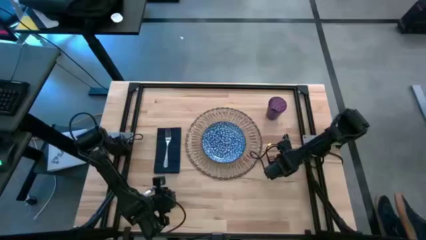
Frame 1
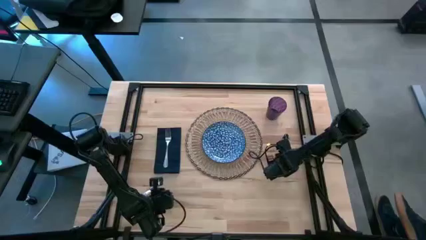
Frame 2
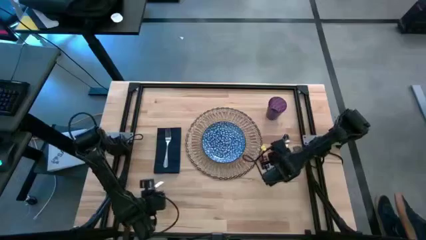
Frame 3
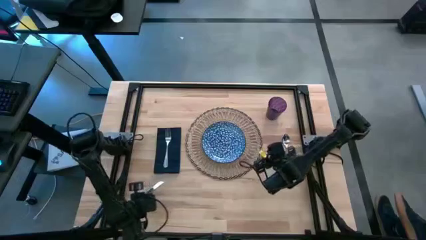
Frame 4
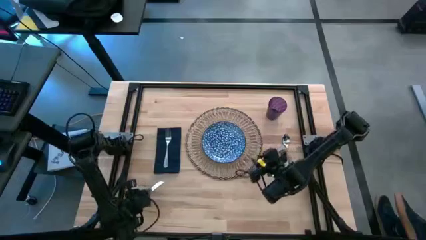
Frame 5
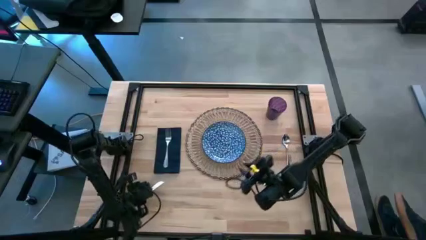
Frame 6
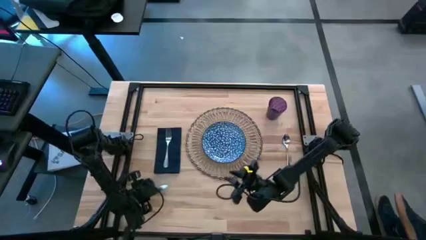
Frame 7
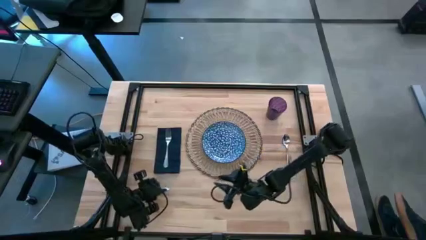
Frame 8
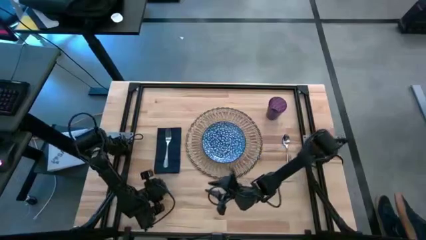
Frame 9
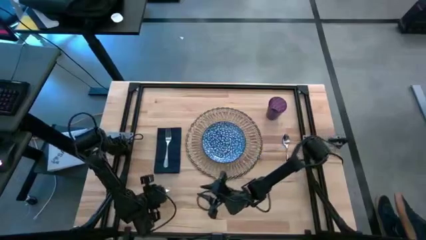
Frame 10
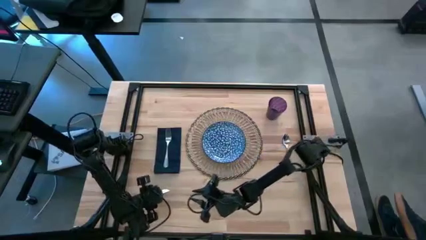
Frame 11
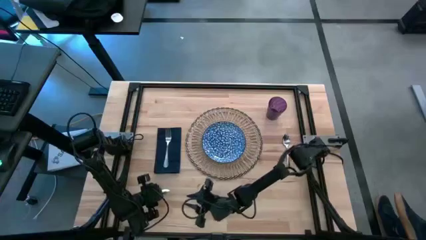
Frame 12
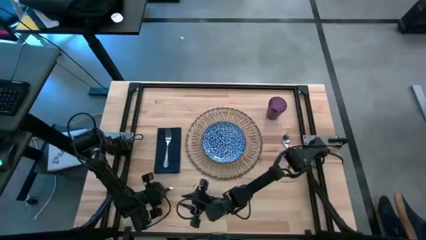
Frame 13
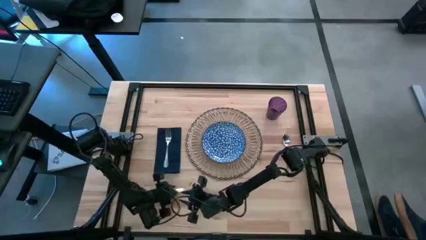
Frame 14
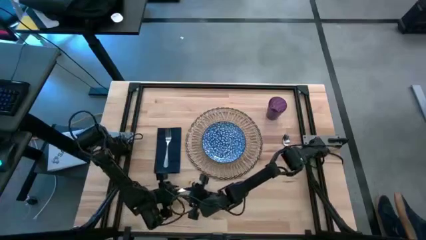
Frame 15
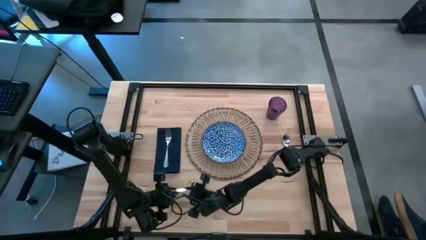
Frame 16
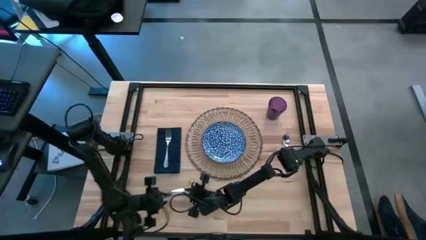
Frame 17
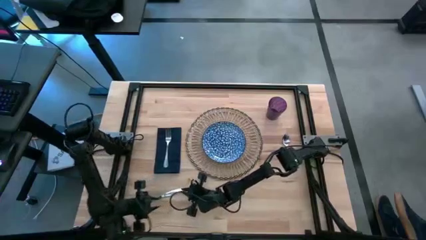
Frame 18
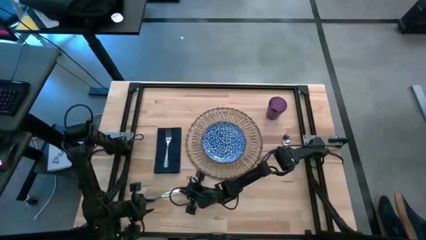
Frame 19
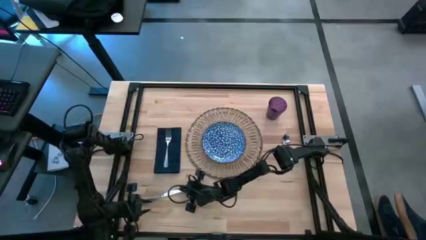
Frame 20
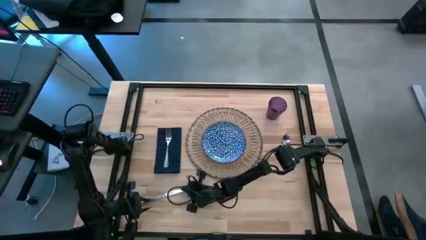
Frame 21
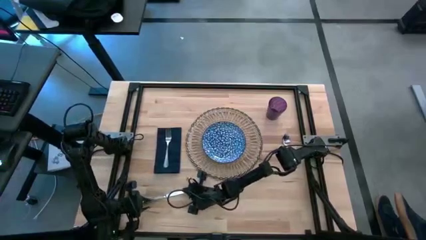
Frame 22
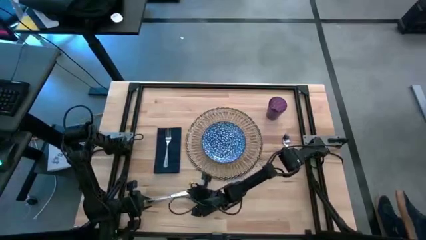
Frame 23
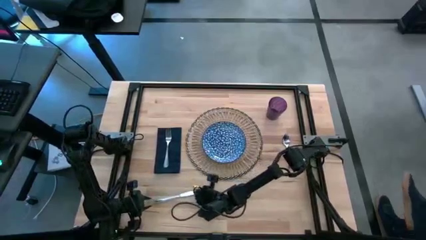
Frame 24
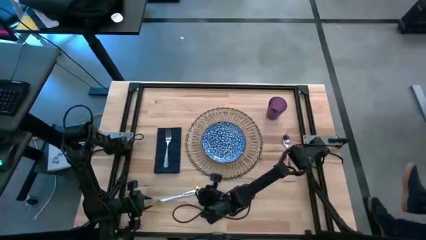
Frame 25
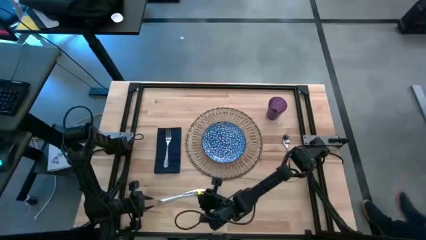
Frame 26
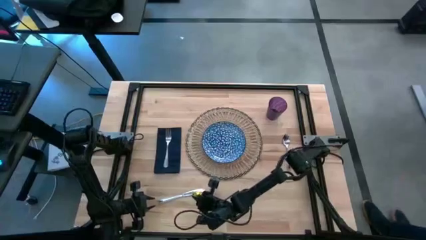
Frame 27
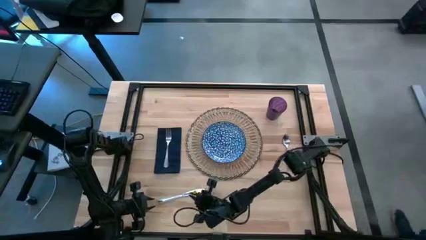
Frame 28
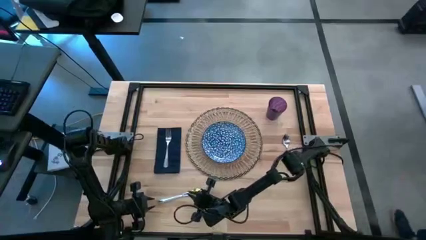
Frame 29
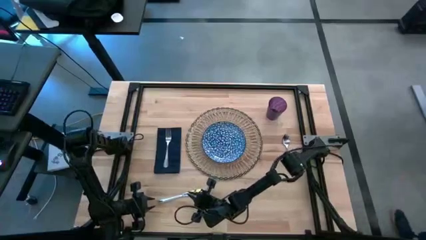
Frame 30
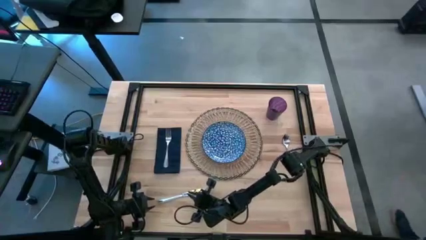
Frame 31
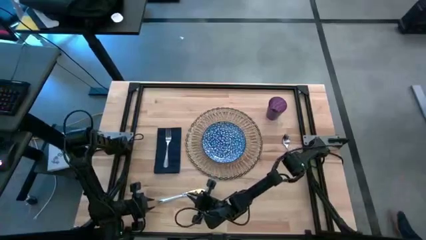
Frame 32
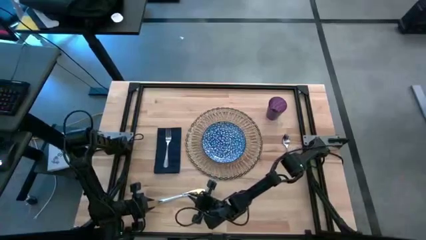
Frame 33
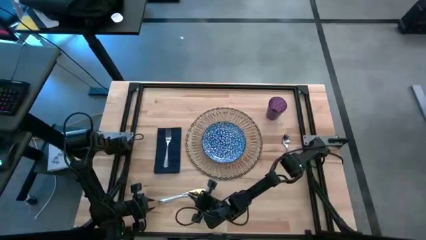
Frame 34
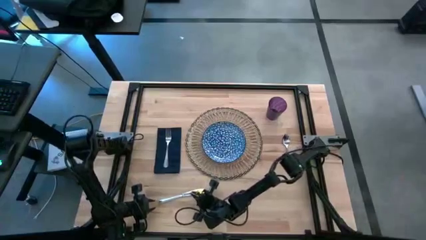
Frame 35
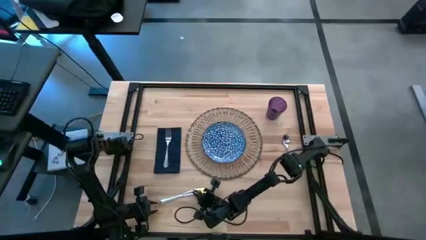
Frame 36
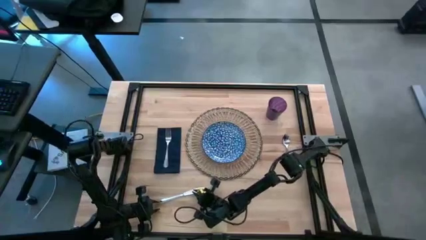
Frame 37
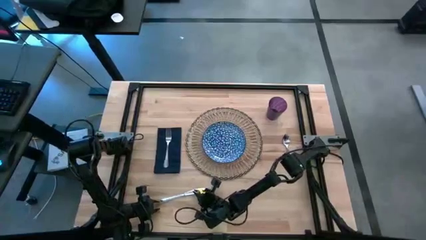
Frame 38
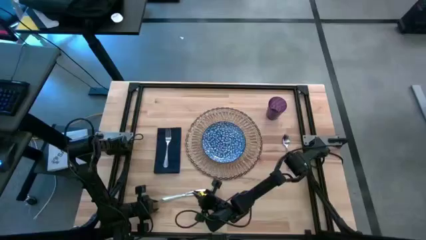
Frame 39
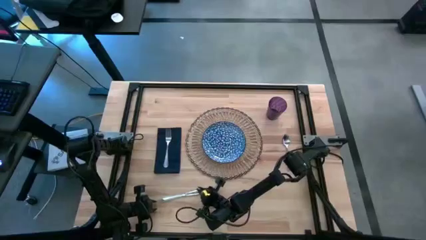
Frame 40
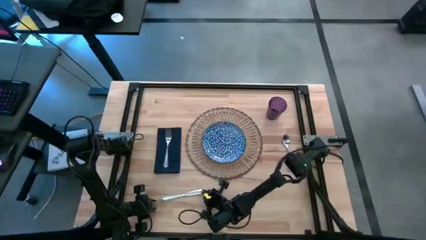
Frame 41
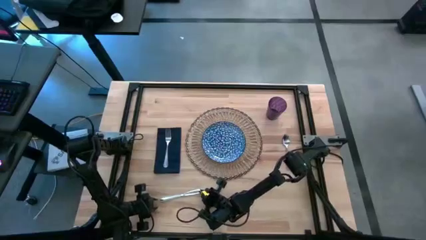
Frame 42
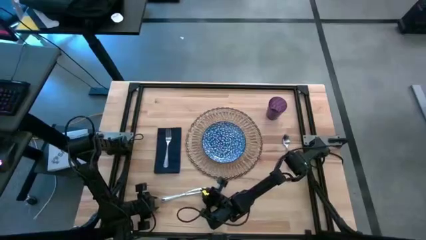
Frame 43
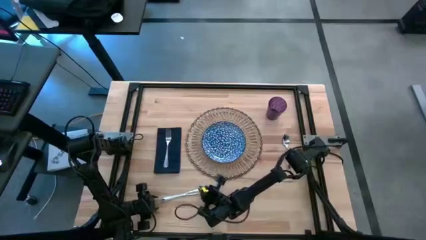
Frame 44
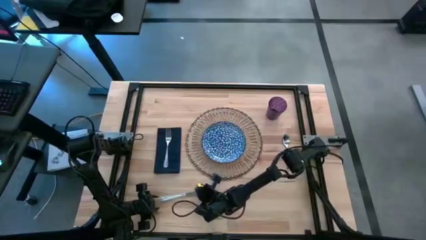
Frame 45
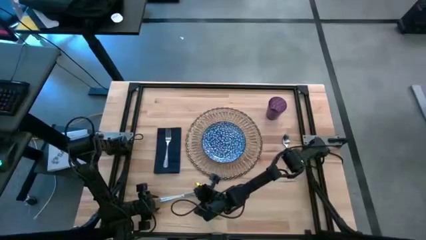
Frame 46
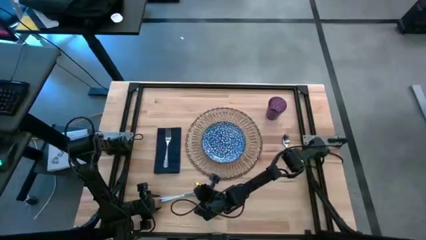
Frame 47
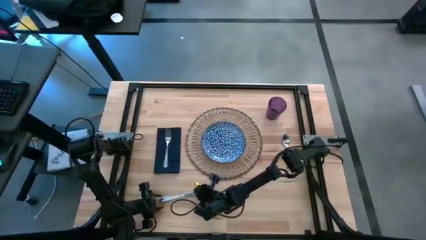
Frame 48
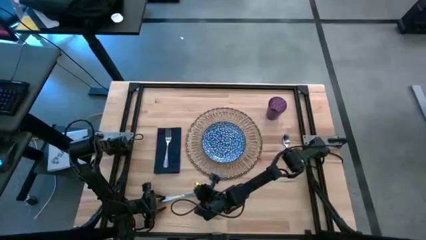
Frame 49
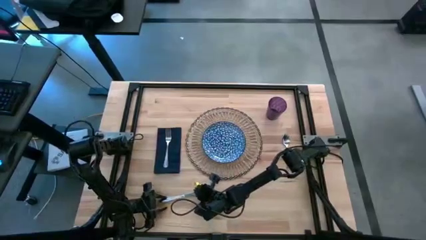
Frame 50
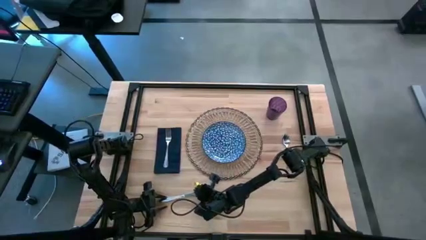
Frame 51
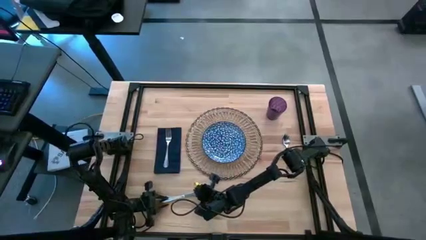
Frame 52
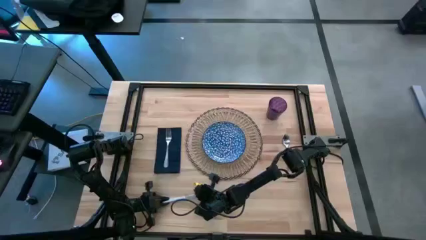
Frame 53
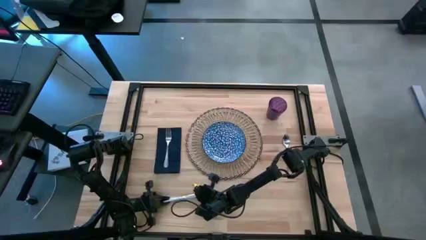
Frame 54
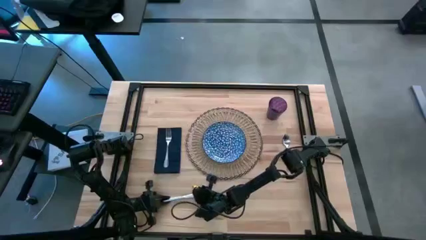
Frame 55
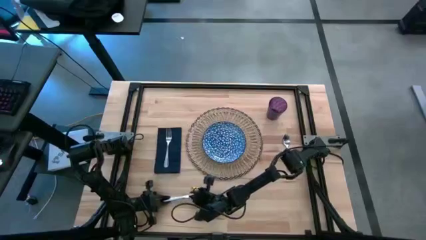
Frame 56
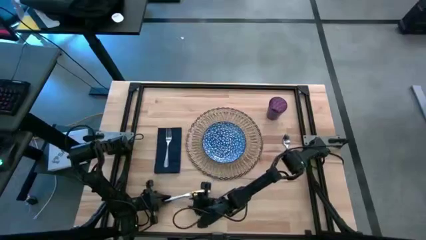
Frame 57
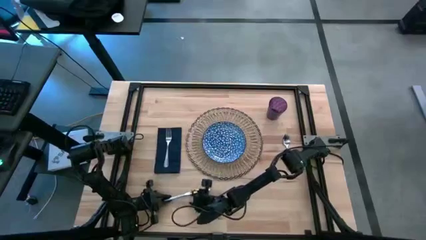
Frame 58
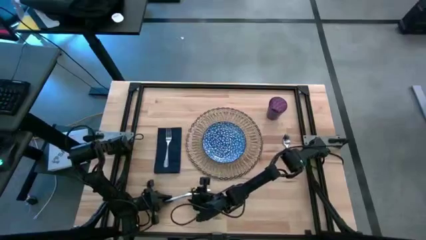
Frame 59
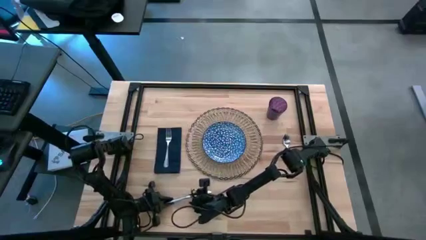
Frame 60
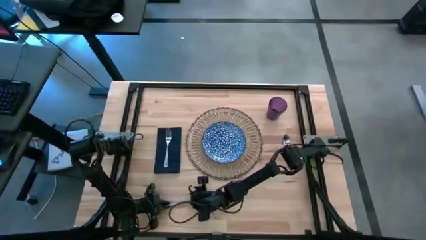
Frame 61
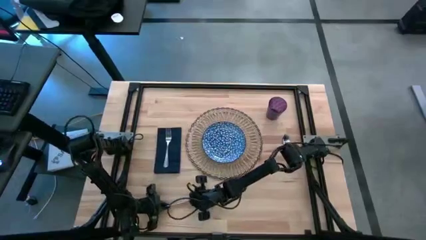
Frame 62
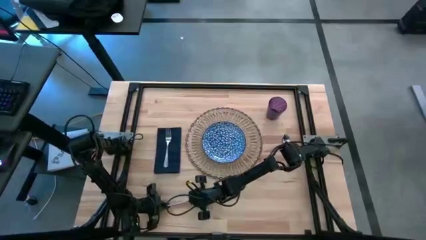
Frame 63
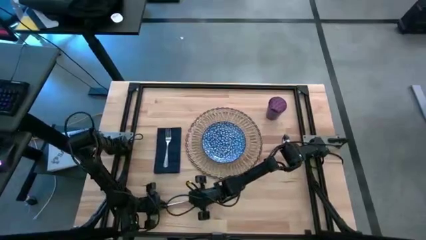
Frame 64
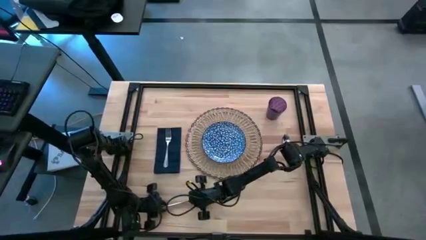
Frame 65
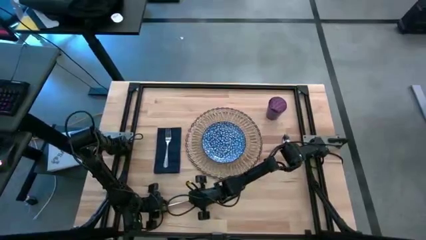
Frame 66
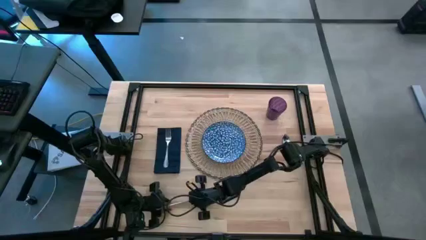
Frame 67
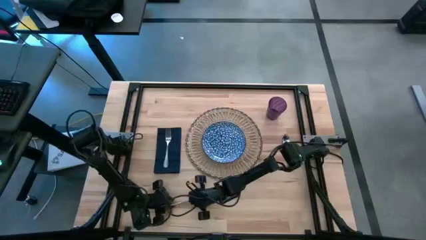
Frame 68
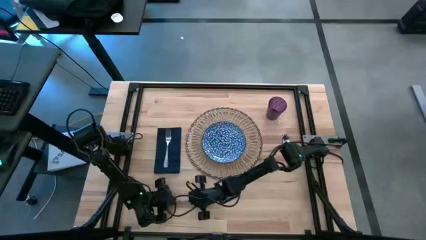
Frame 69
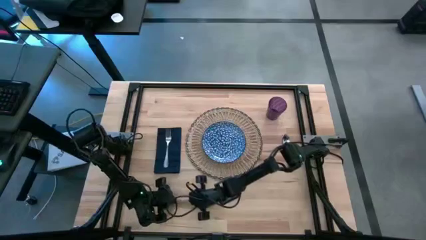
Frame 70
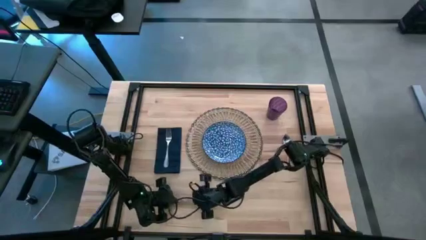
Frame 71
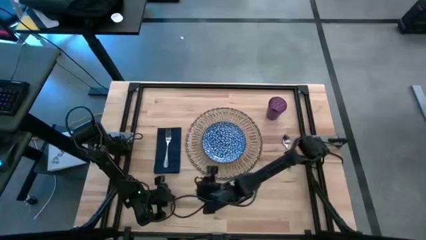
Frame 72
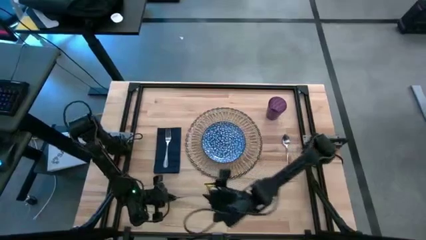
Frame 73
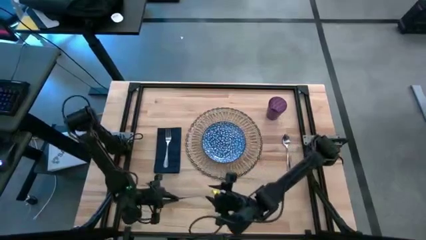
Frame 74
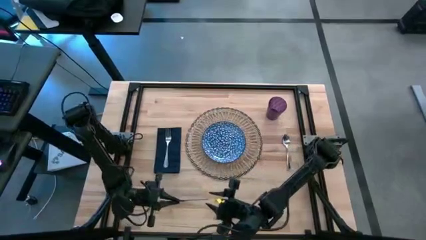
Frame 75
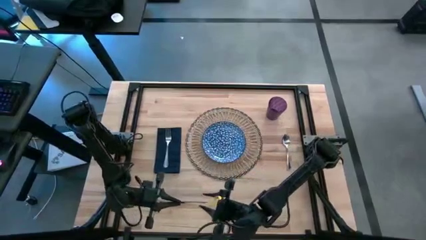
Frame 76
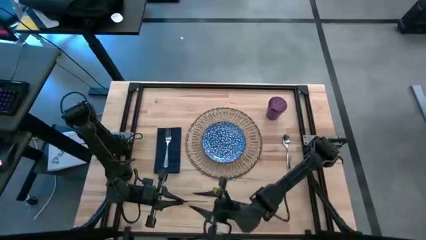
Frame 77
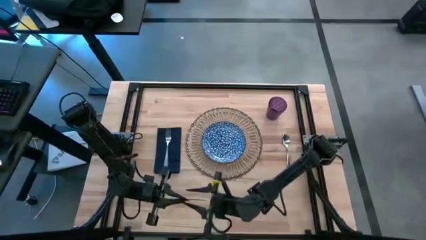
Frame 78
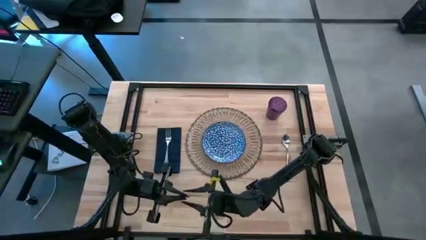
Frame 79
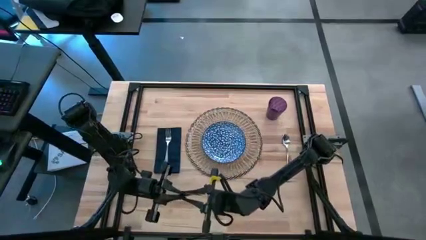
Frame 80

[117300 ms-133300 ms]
Task: Set table place
Put the table knife to the left of the silver spoon

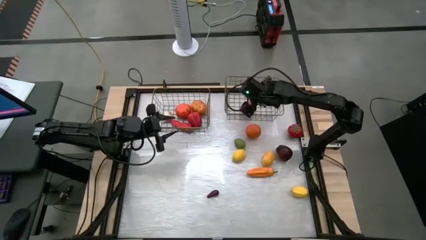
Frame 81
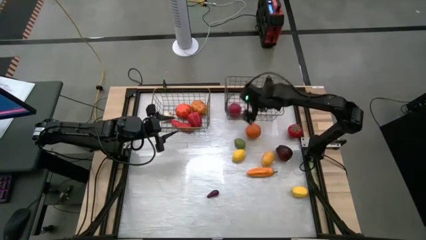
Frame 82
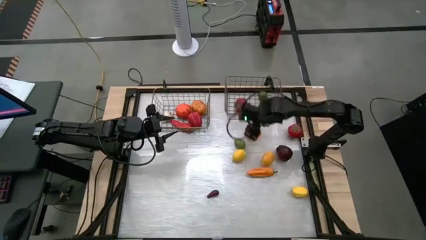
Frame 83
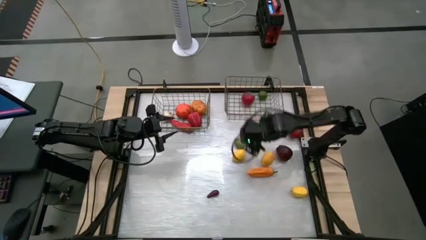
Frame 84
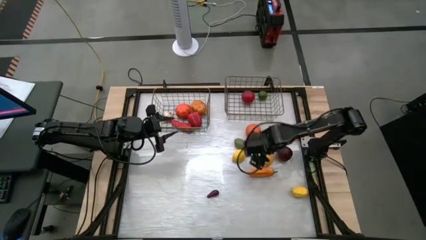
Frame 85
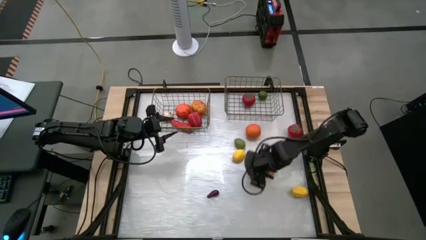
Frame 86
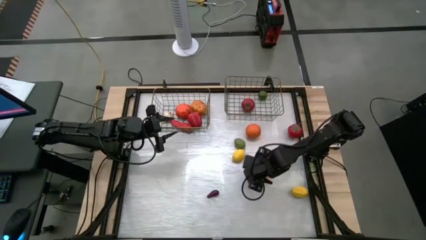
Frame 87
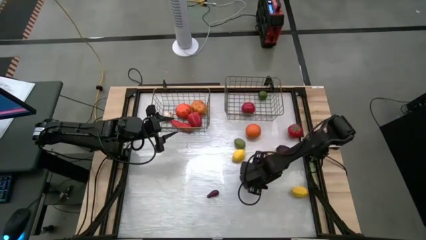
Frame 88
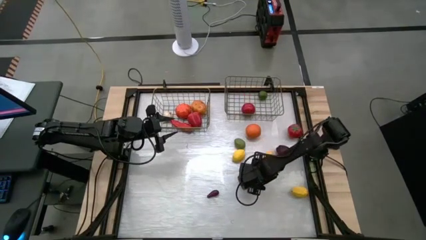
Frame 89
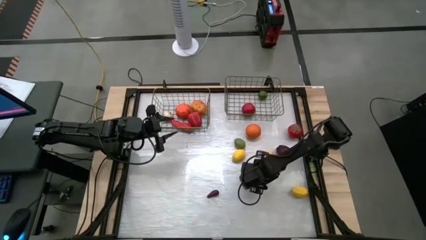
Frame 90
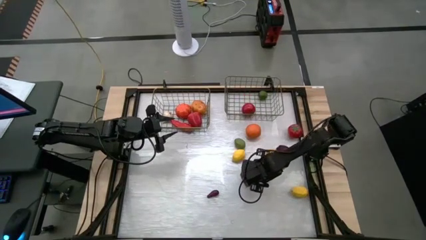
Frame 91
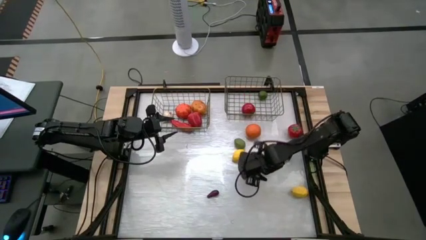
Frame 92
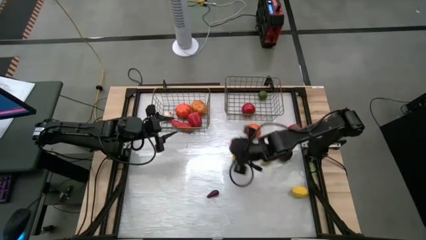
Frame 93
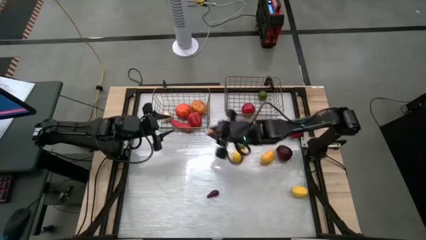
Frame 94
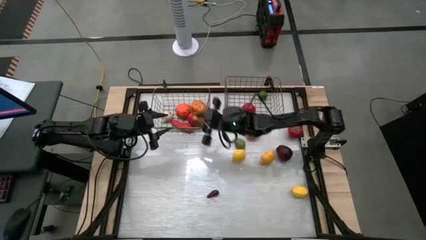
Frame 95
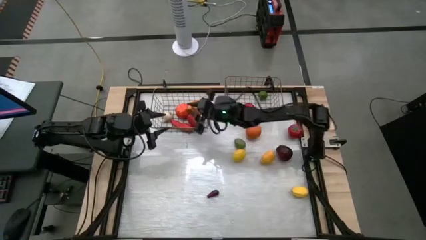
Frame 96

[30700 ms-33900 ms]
Task: Sort produce into baskets
Put the yellow chili pepper into the left gold wire basket
